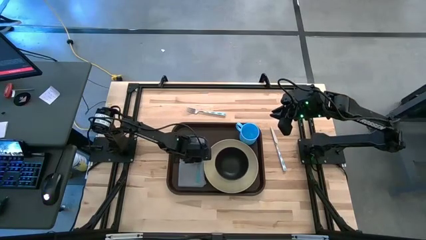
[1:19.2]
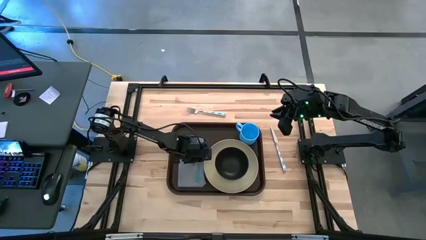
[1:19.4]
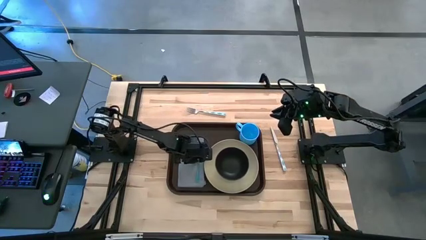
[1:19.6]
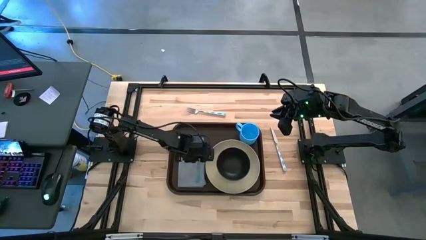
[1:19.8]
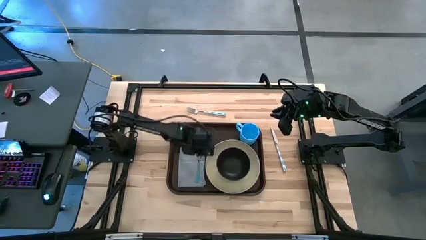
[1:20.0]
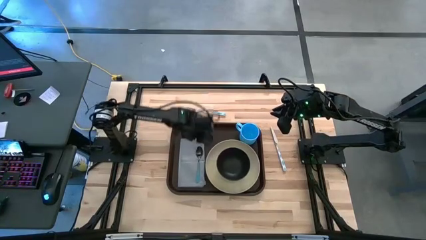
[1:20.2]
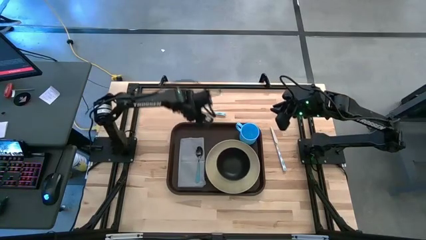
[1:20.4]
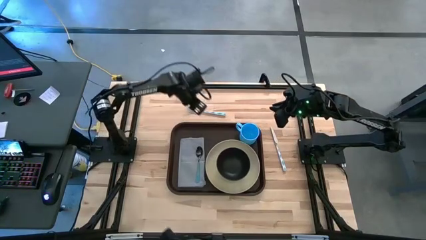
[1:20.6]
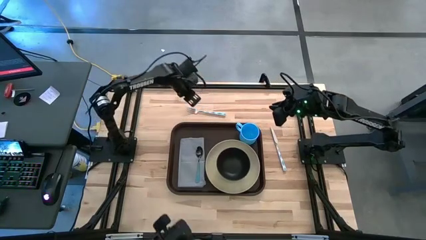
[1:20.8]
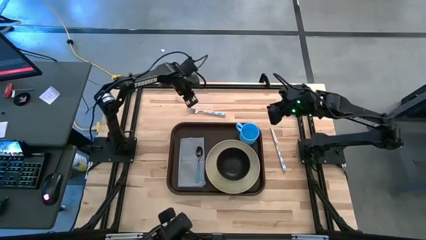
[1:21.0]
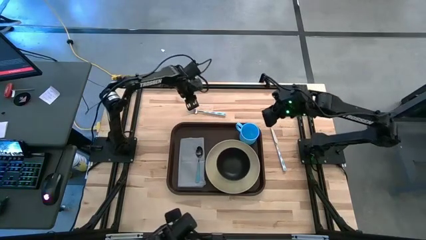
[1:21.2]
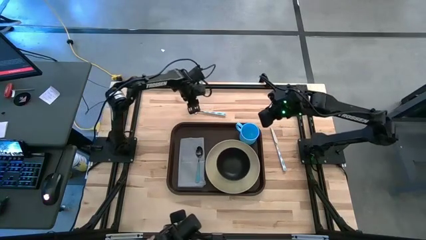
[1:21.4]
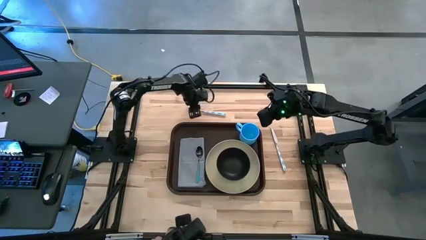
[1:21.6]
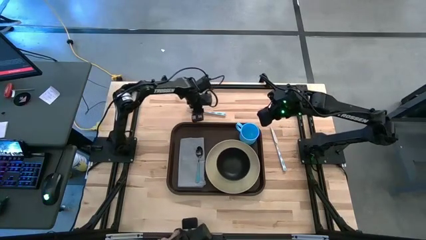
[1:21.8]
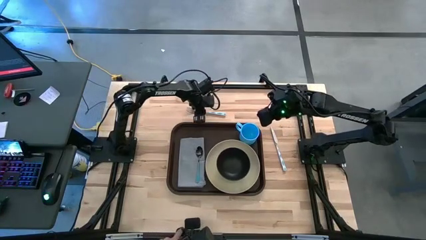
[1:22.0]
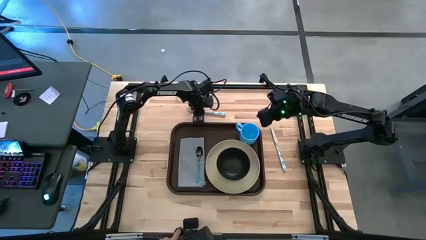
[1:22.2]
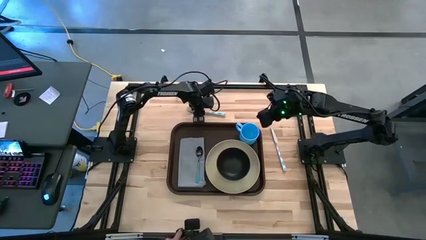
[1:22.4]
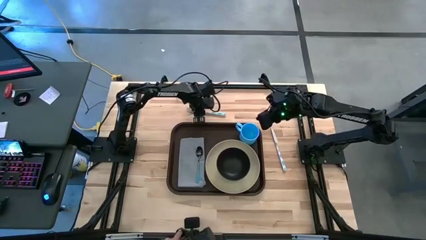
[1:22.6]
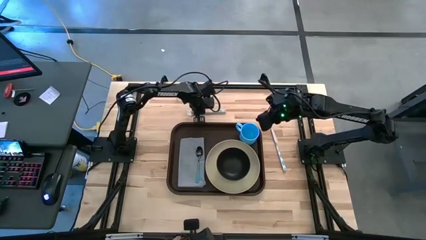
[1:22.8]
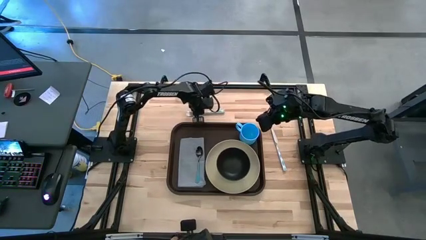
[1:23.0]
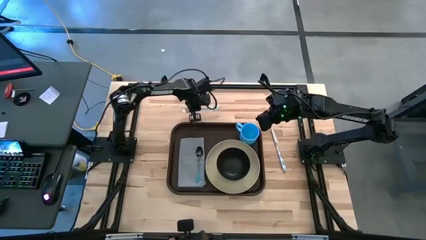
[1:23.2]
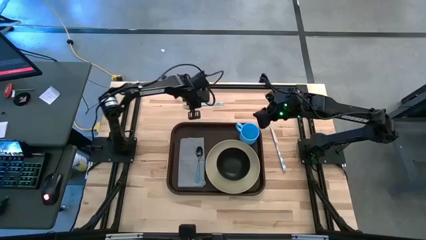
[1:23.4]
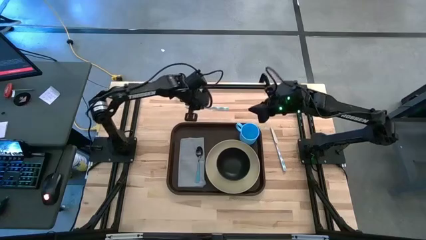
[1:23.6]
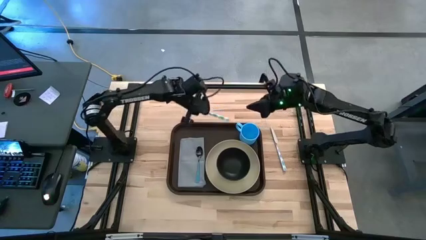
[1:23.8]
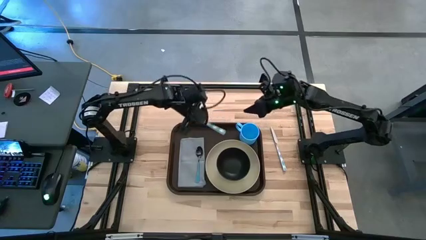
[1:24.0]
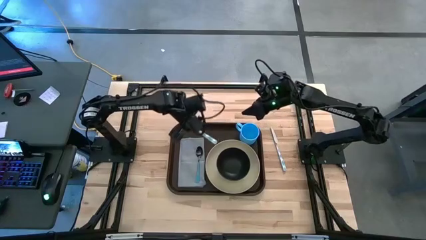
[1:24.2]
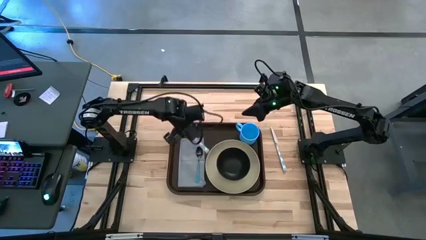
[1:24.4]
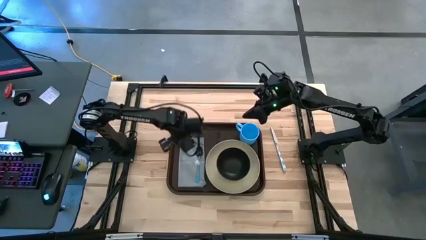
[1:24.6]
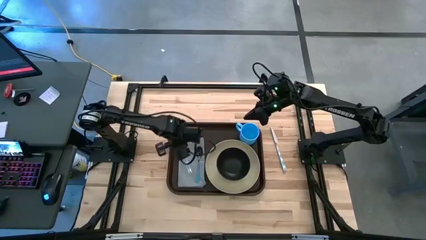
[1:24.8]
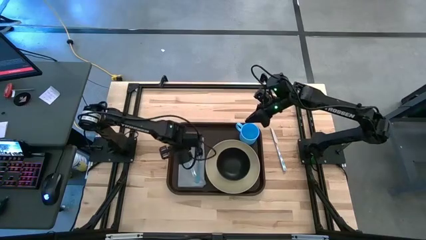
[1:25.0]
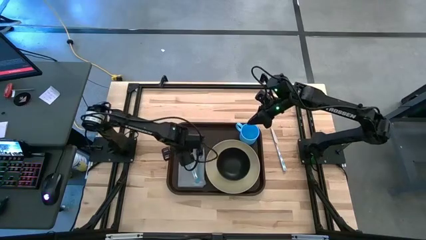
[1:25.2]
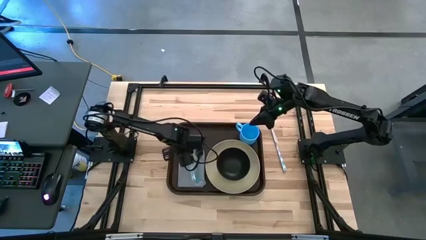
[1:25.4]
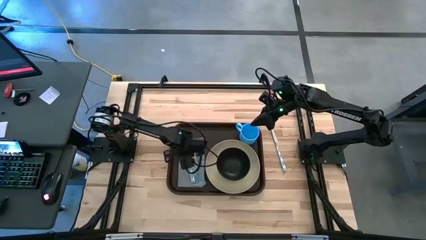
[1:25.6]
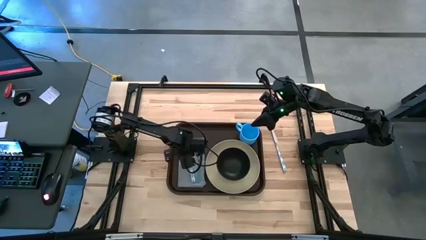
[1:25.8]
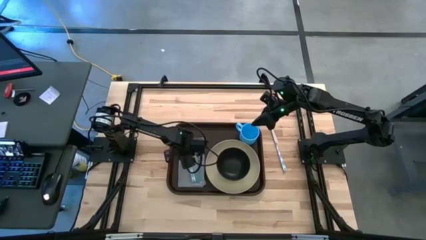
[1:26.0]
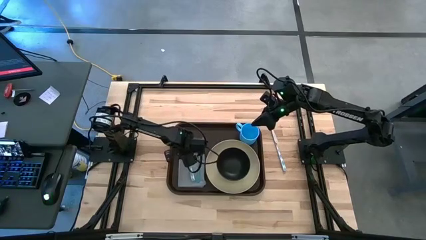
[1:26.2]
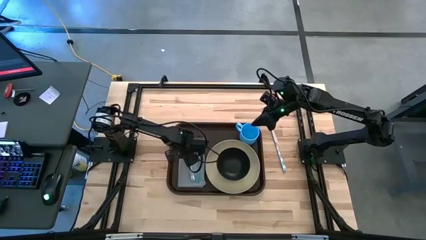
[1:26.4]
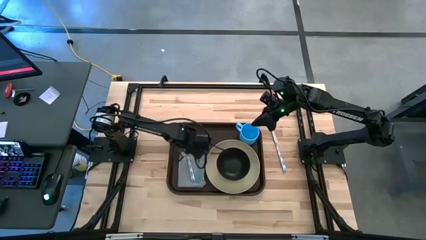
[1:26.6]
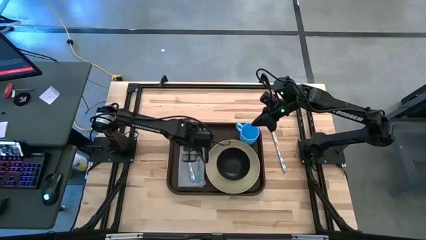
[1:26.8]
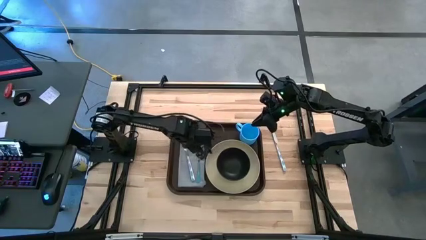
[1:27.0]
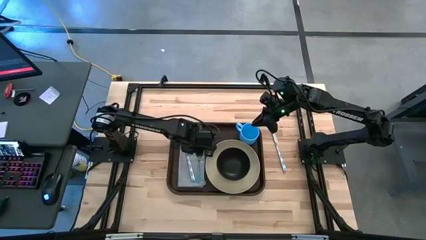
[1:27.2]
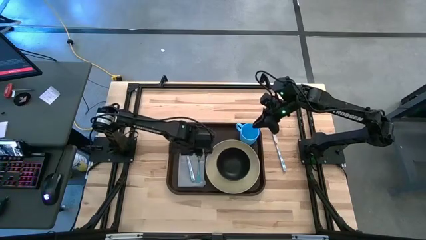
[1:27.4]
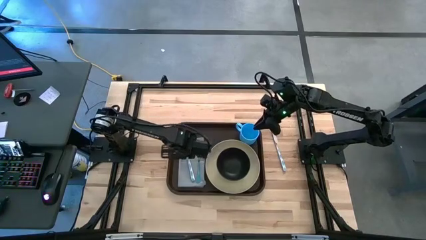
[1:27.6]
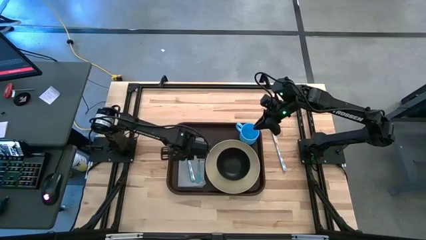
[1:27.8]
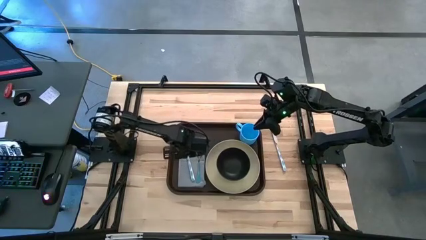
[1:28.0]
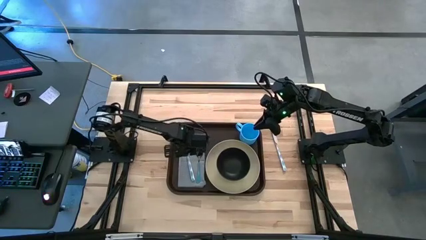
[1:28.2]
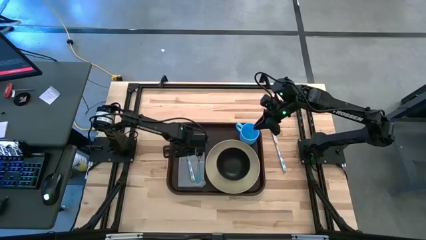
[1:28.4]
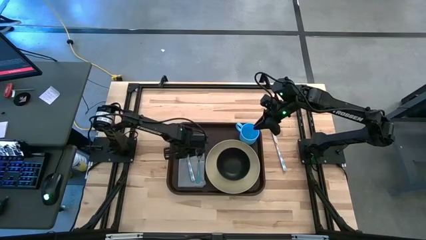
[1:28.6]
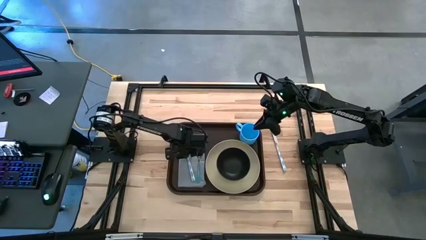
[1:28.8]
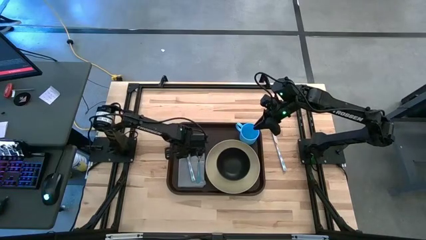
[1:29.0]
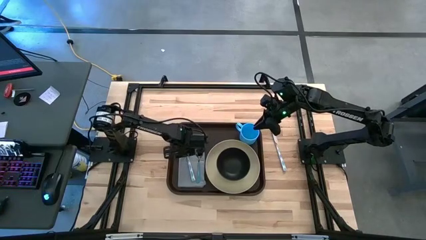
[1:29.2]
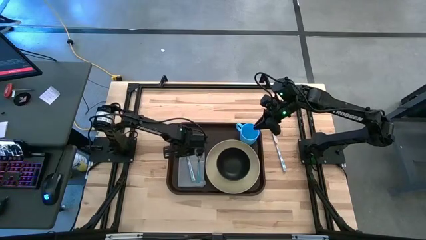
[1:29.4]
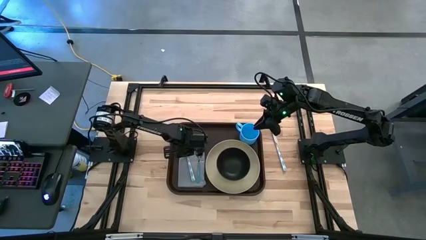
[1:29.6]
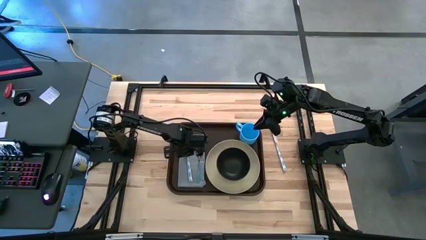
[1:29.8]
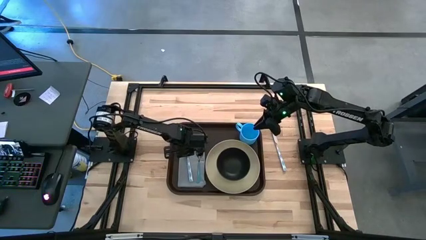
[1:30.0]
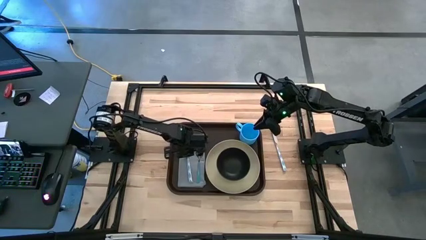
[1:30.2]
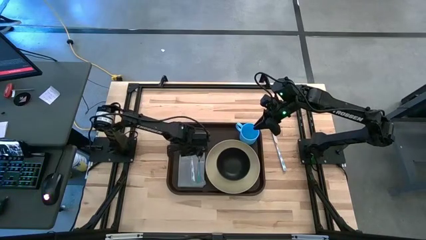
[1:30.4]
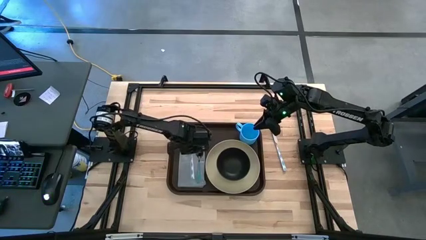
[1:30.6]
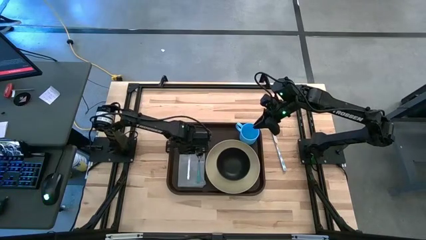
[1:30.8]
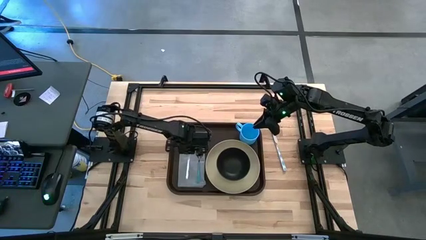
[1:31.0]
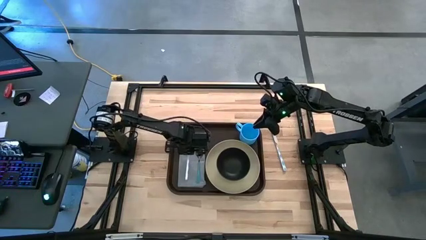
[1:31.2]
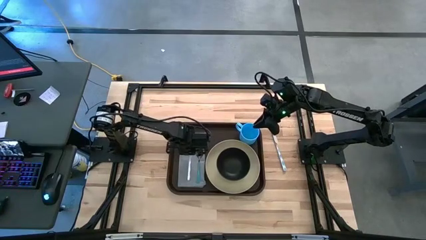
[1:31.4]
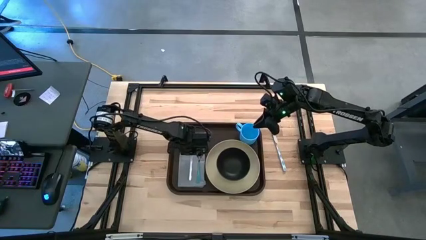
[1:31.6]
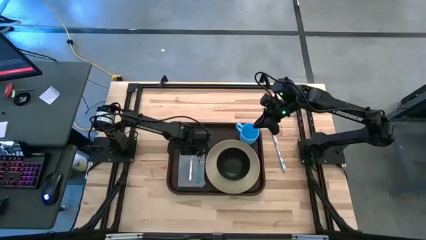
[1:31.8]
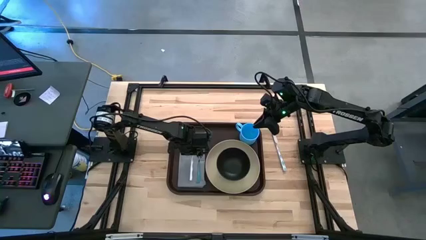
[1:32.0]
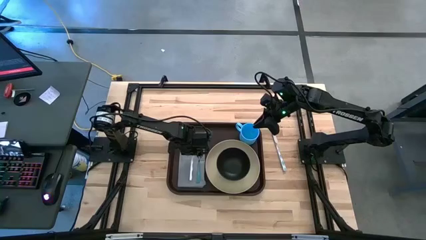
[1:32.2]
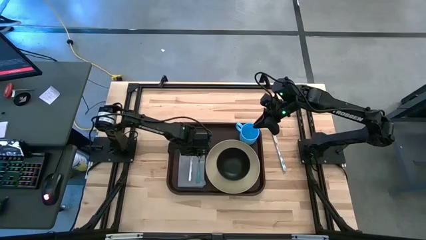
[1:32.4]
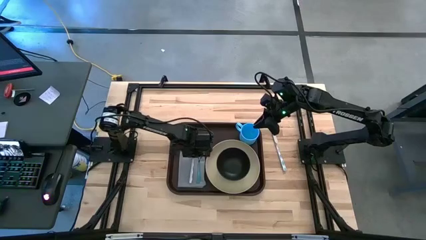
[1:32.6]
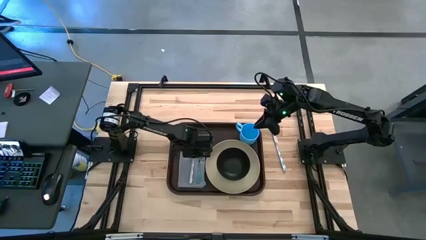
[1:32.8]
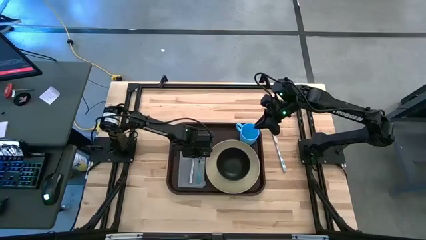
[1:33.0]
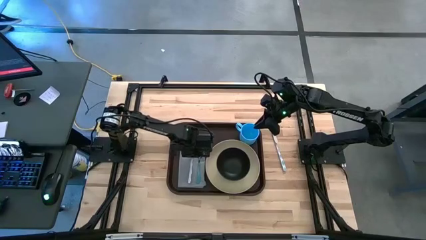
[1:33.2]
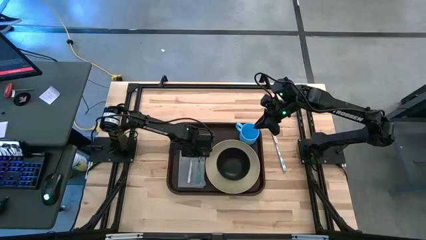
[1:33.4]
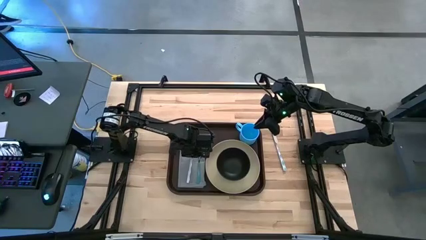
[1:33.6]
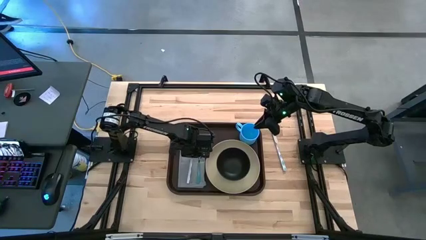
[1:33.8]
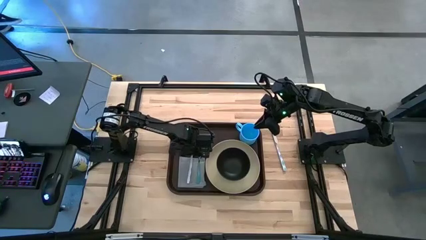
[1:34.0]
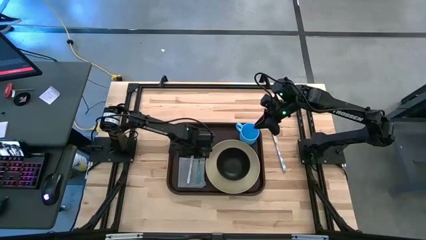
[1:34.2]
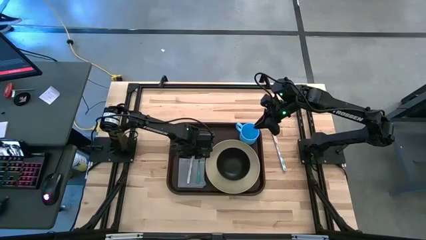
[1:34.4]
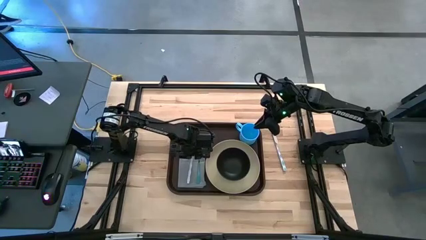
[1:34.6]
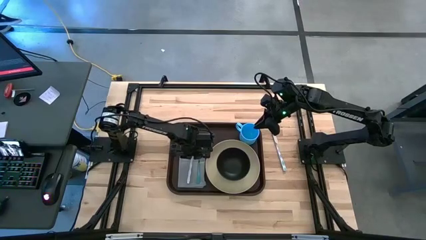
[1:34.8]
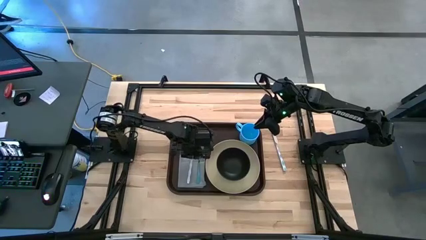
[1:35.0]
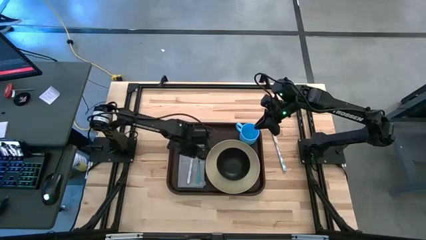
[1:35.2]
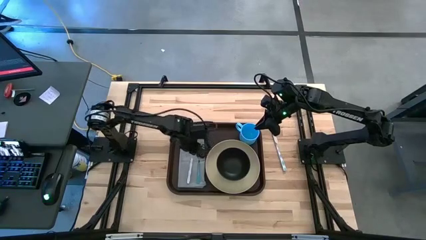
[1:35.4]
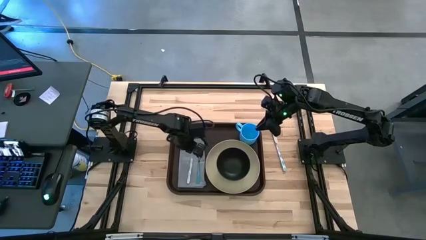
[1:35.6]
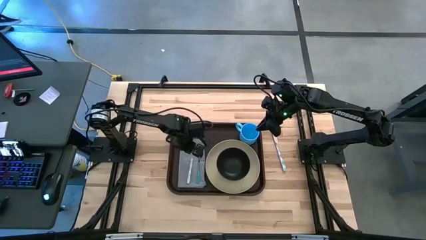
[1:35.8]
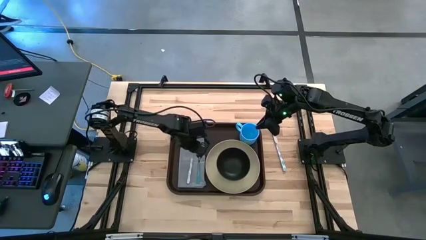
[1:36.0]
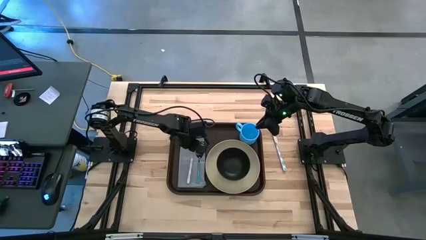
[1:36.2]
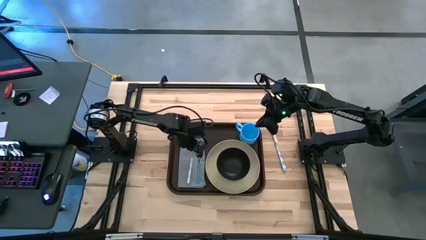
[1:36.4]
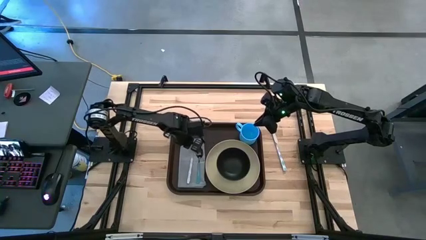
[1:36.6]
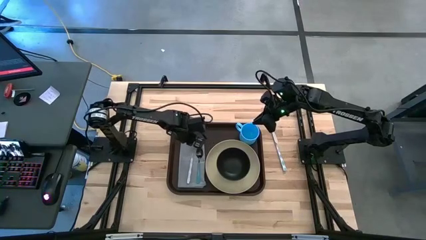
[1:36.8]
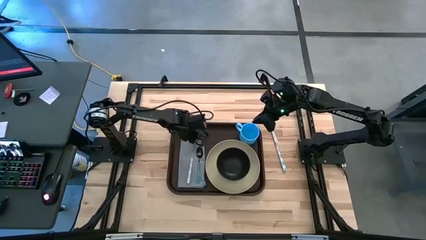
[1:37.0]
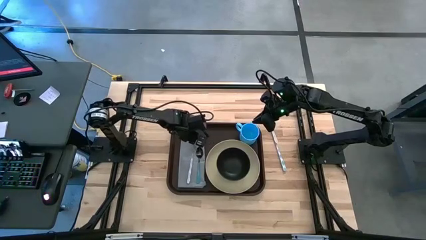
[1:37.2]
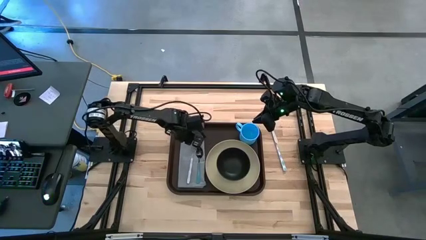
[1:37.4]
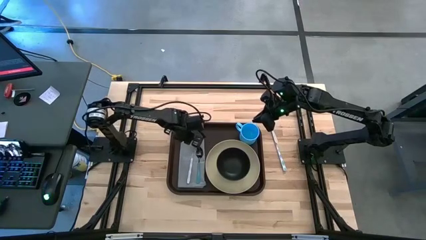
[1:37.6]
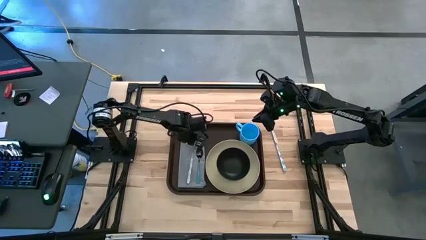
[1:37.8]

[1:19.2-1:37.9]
Task: Set up tray
Put the blue patterned fork on the gray napkin to the left of the blue spoon
